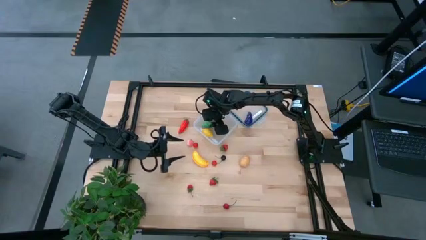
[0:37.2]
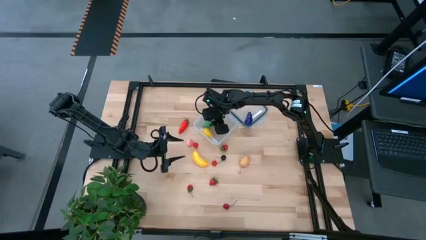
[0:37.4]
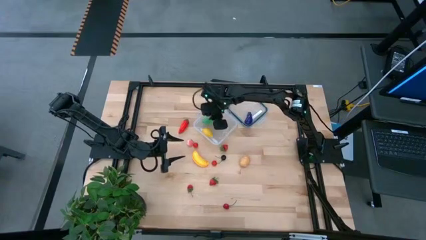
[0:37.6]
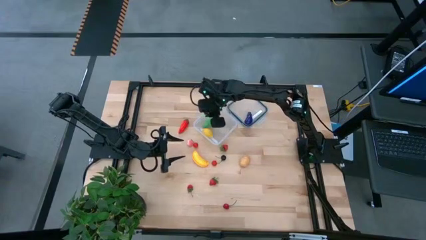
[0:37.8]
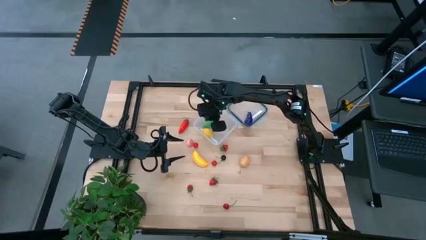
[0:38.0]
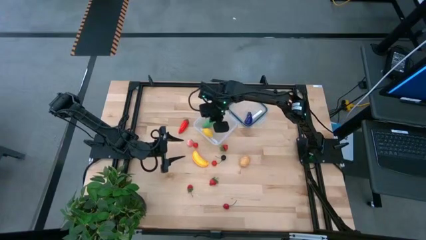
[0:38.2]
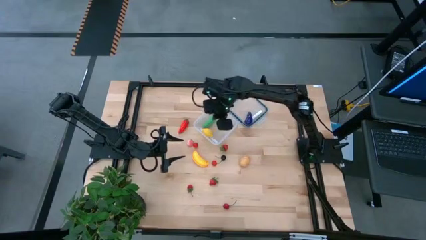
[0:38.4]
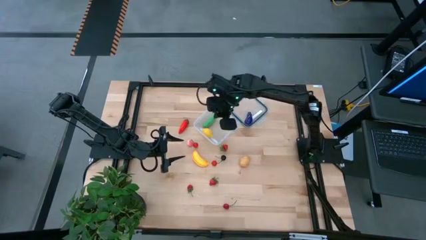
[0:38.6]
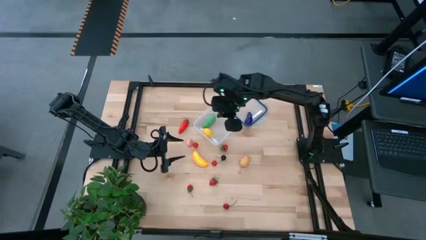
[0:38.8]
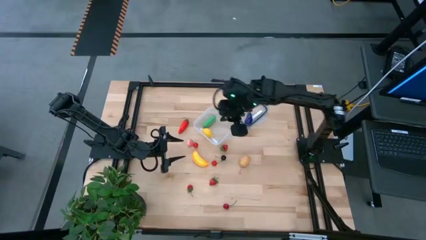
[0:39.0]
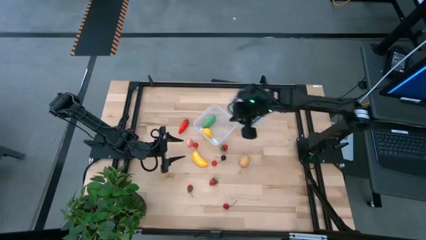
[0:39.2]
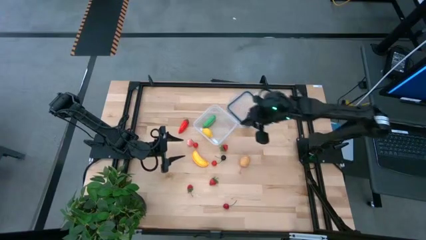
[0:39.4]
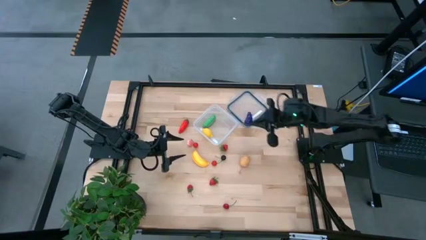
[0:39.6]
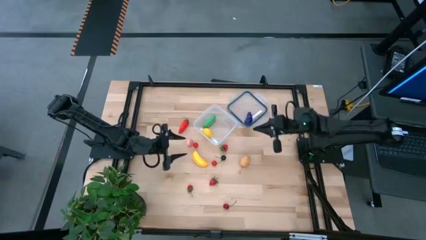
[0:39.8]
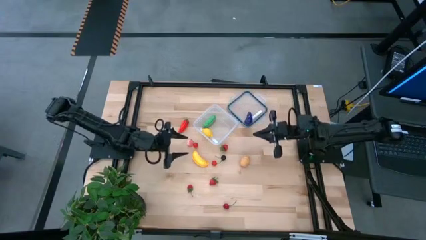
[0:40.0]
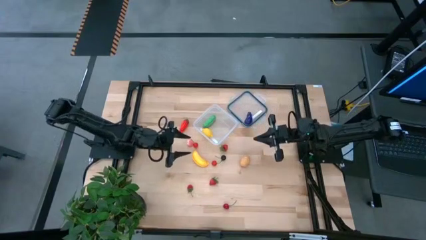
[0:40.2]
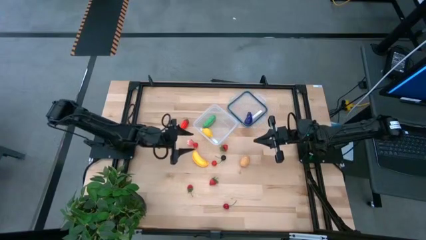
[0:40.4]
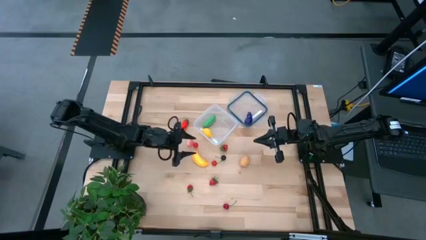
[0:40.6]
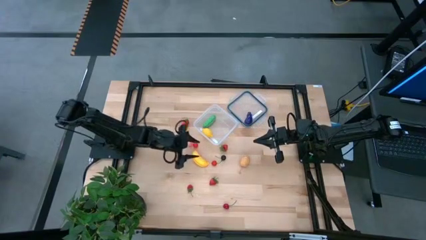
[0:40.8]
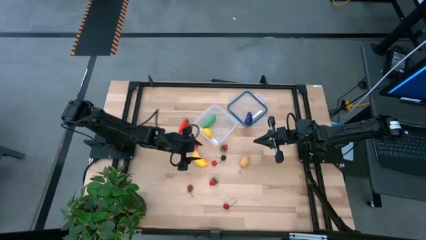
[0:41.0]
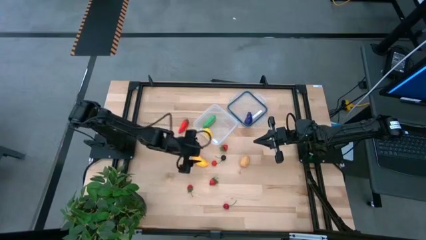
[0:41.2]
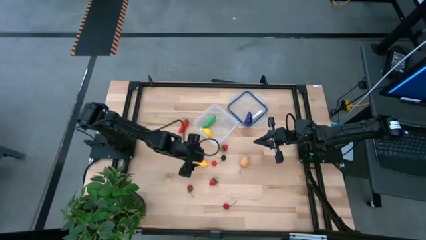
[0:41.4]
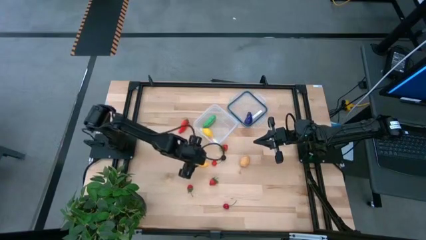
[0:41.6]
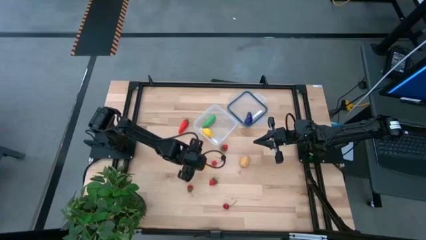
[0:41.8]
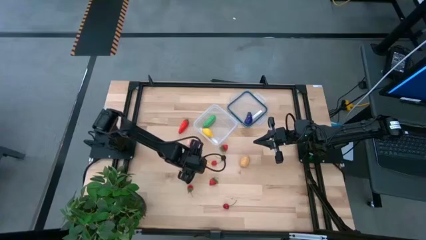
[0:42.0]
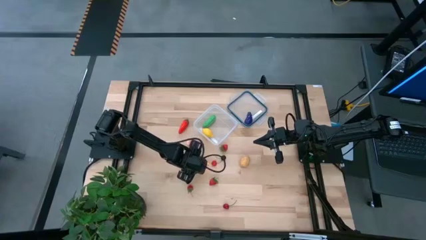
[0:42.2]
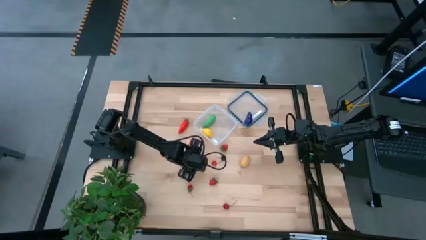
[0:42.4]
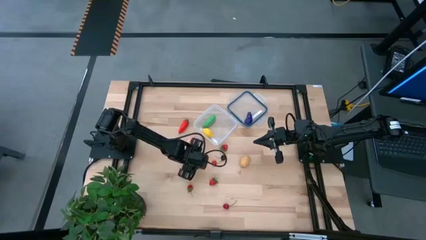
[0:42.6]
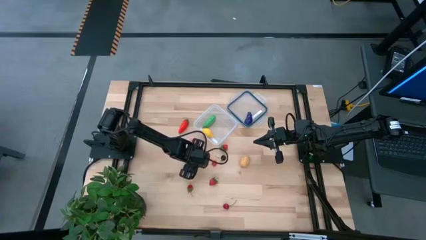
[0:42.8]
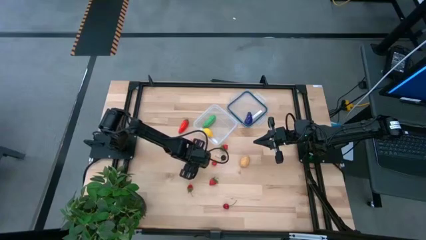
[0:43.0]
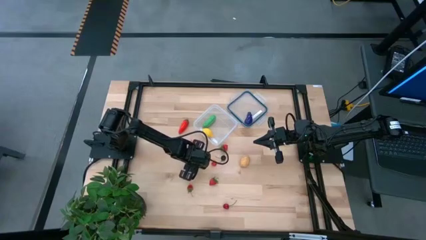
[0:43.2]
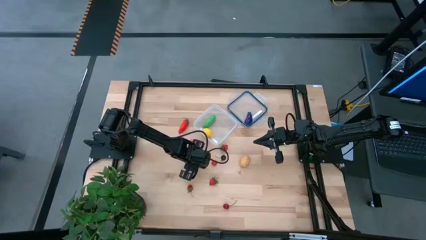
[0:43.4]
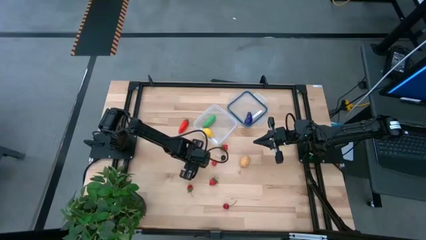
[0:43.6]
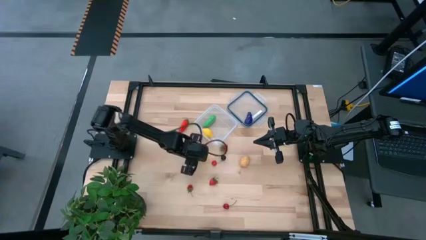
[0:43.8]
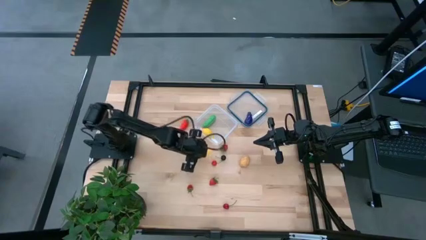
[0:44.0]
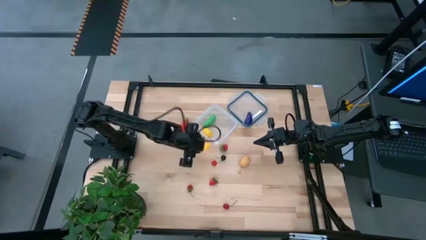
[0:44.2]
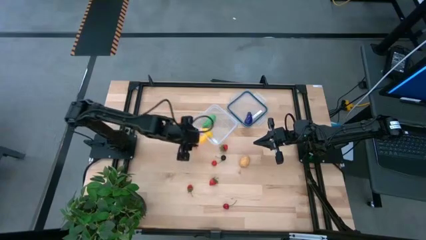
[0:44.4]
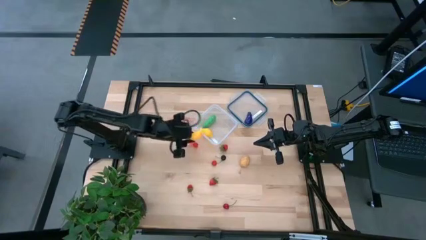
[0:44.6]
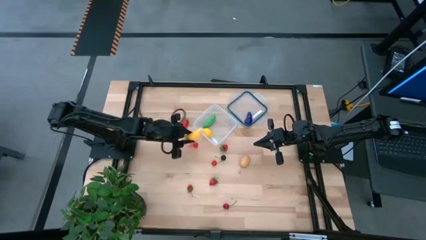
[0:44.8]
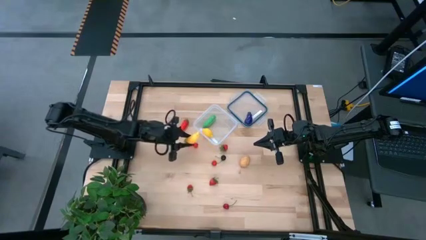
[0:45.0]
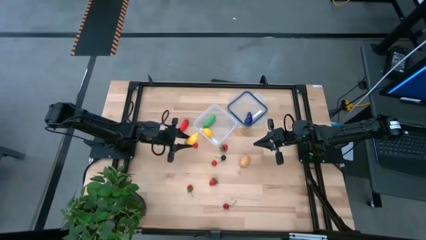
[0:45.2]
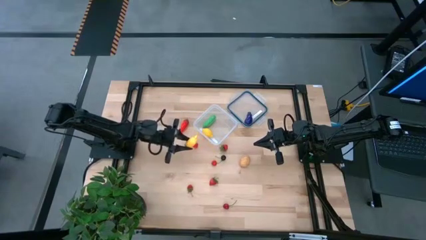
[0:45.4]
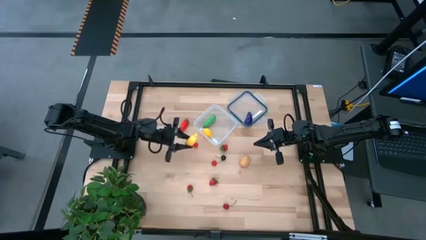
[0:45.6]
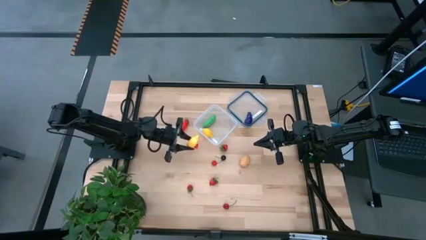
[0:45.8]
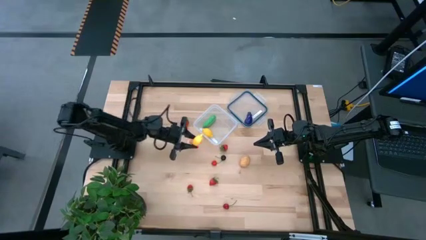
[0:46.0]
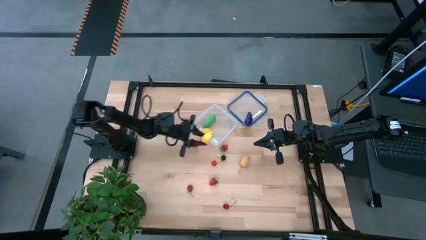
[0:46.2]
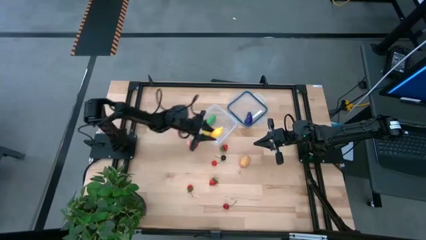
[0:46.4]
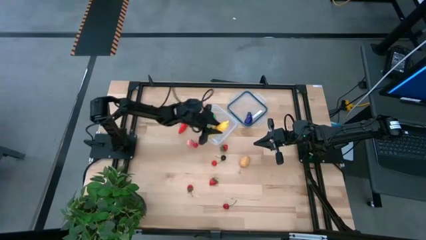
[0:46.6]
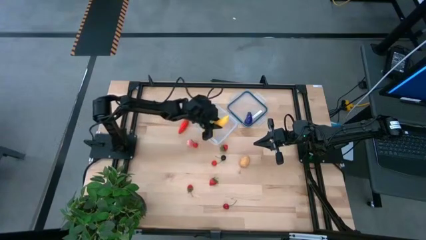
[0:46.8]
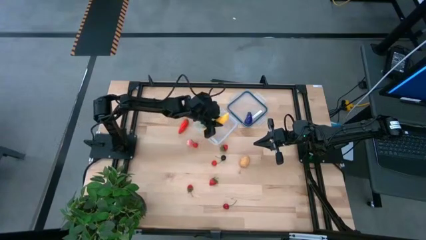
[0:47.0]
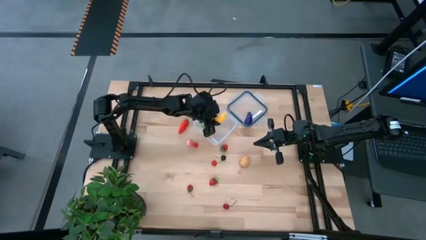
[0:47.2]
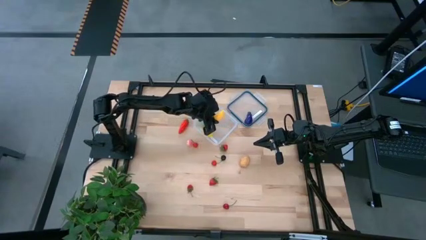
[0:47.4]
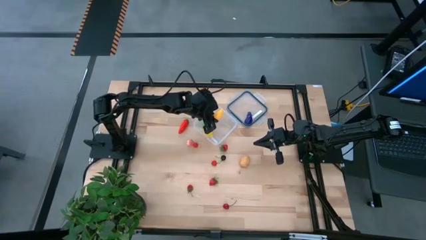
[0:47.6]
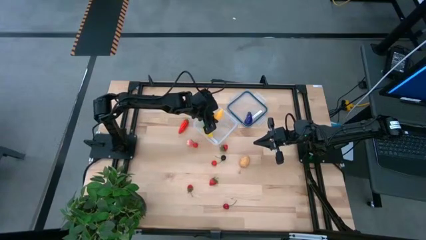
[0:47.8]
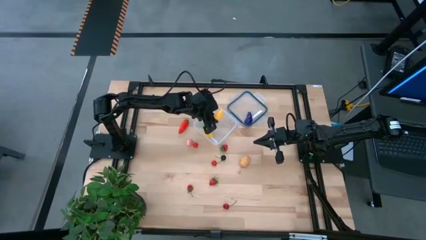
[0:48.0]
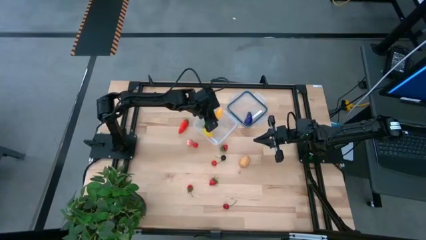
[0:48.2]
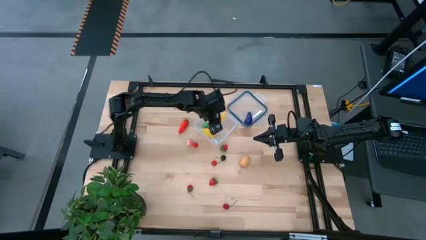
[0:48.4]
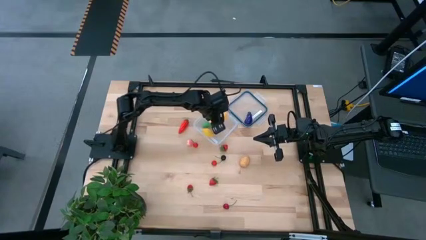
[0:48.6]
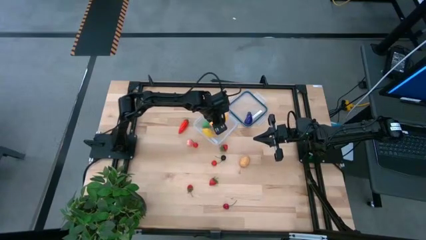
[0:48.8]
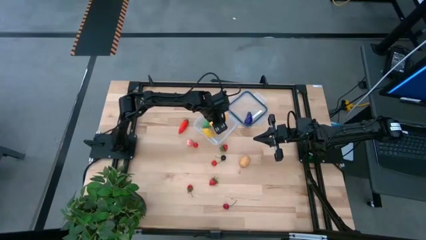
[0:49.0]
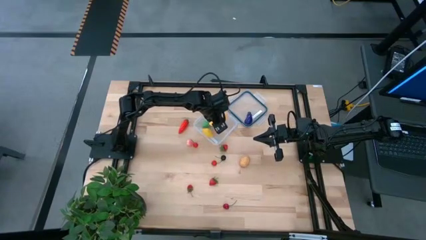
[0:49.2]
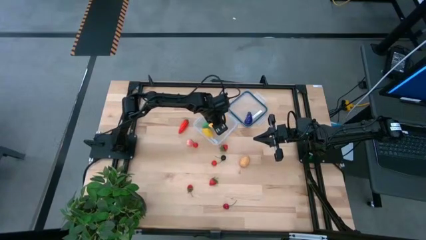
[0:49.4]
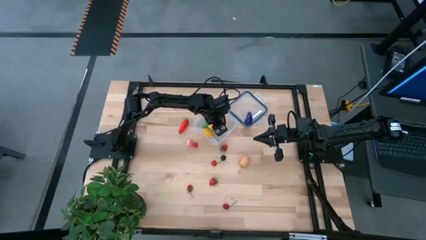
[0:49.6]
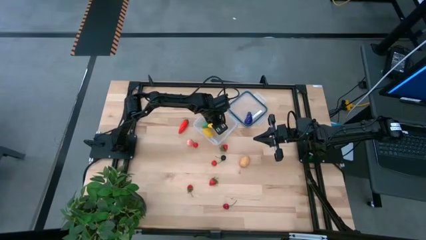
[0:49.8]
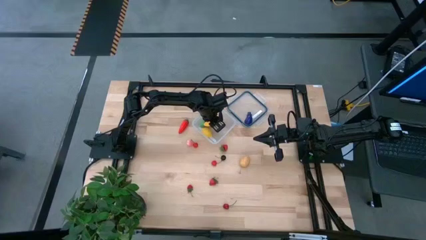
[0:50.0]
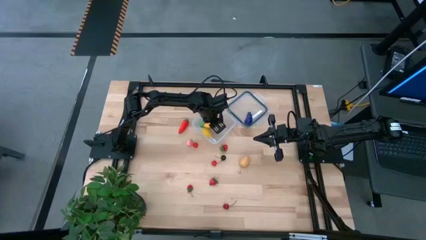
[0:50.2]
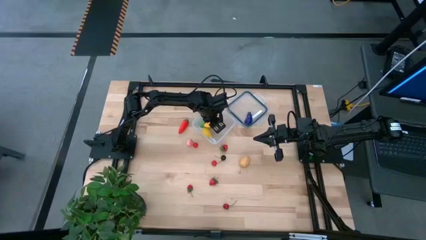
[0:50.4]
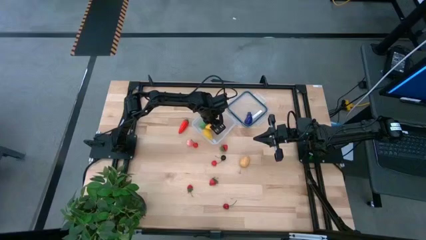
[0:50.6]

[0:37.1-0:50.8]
Task: Pick and placing Produce into tupperware
Put the yellow banana into the transparent container

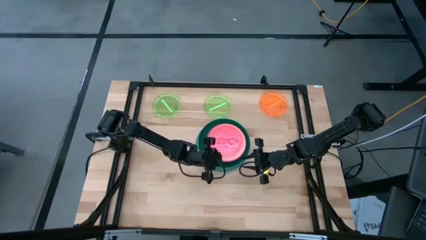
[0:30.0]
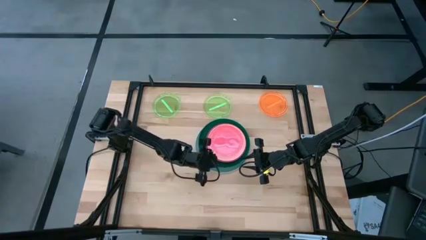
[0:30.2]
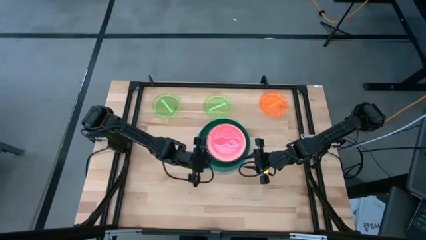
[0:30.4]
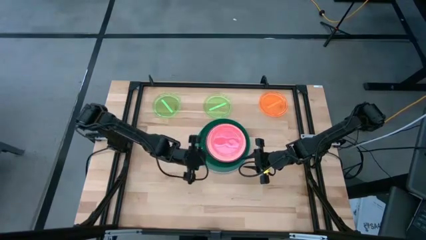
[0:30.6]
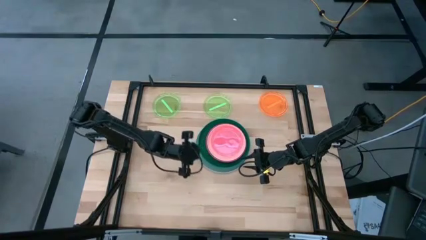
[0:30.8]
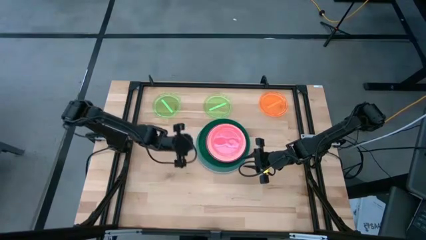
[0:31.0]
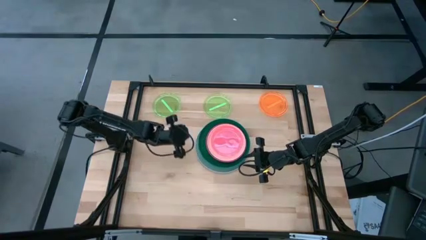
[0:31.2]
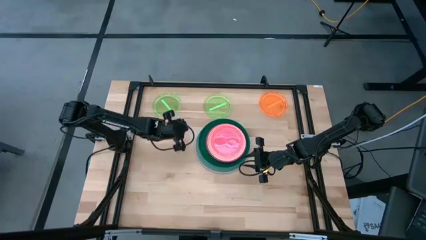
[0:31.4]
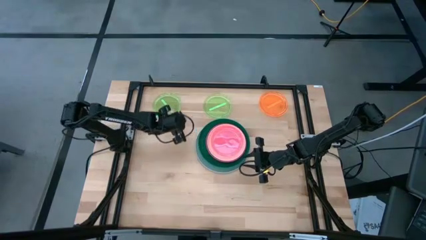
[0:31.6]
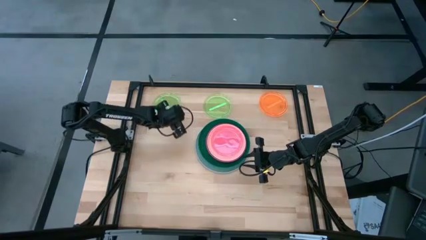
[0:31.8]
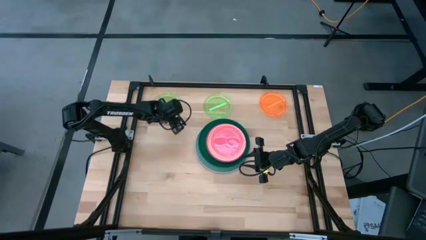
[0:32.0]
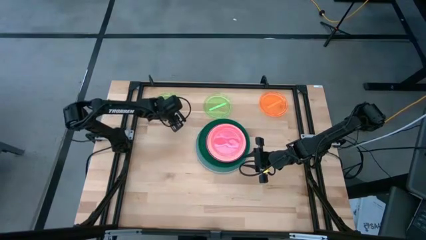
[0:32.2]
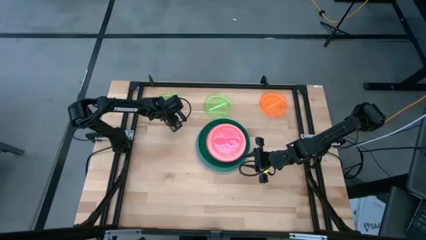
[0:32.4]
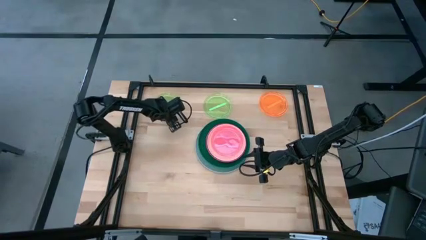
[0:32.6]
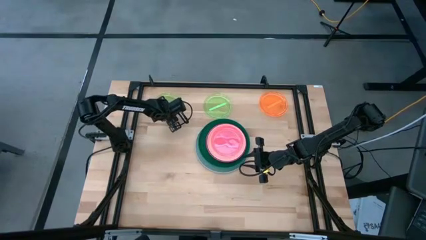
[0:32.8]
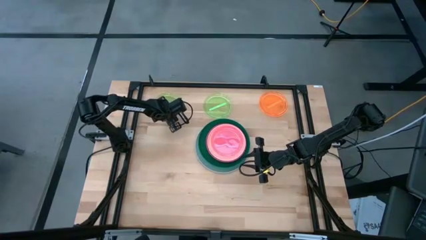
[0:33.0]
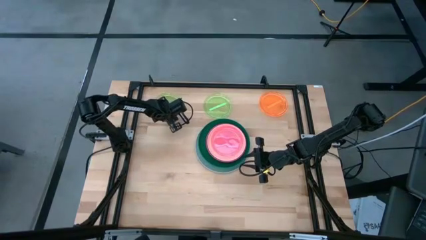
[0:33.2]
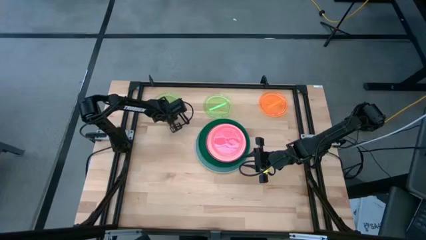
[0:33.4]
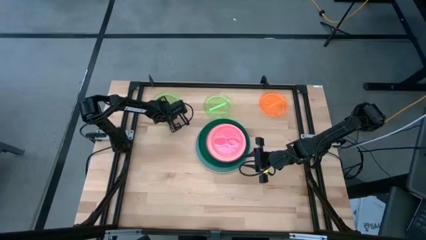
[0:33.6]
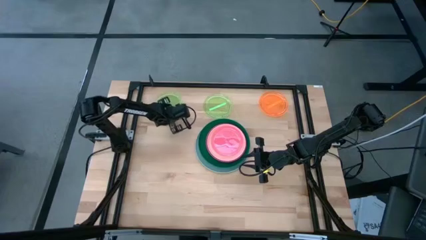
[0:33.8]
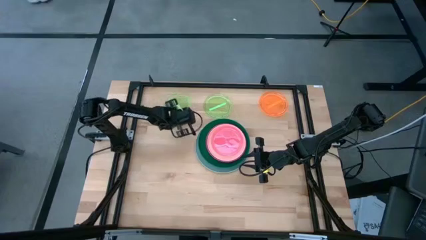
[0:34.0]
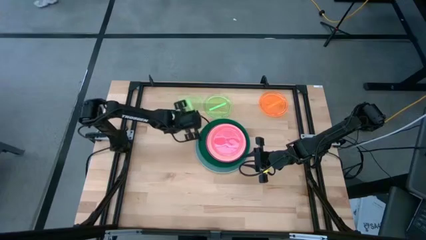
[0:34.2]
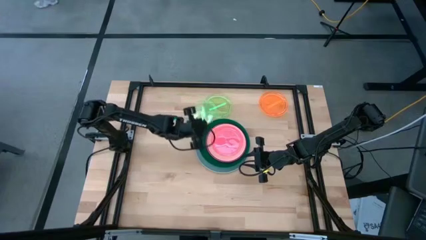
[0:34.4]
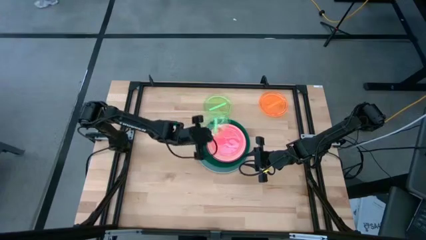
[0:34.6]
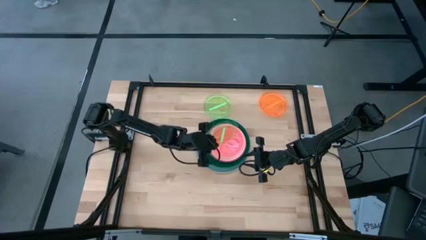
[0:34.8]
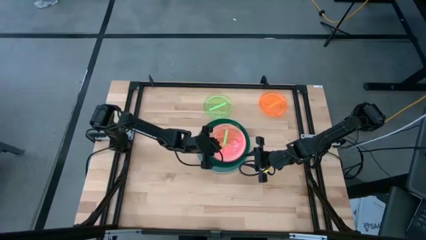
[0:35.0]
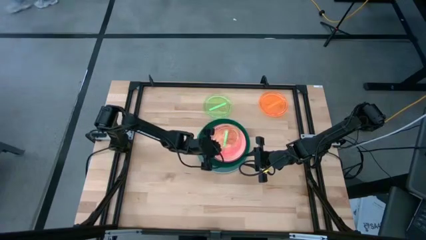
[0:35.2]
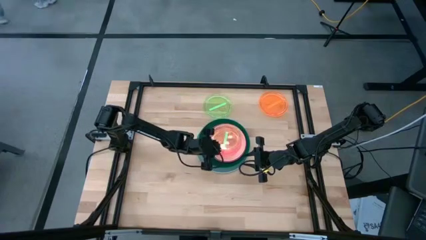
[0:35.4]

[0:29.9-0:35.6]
Task: Stack plastic plates
Stack the left light green plate on top of pink plate
